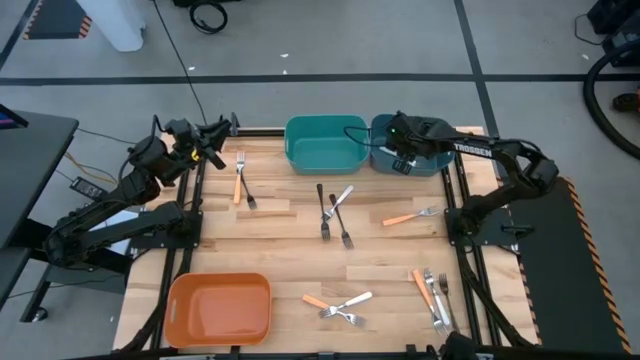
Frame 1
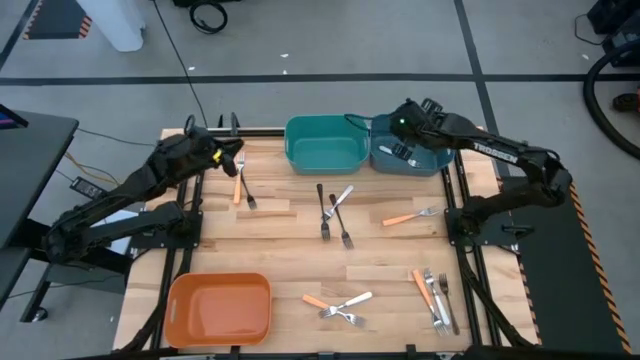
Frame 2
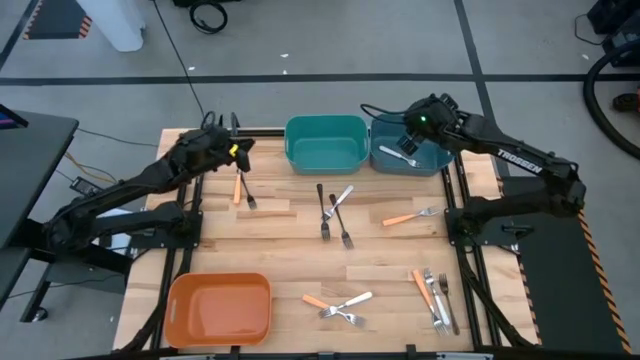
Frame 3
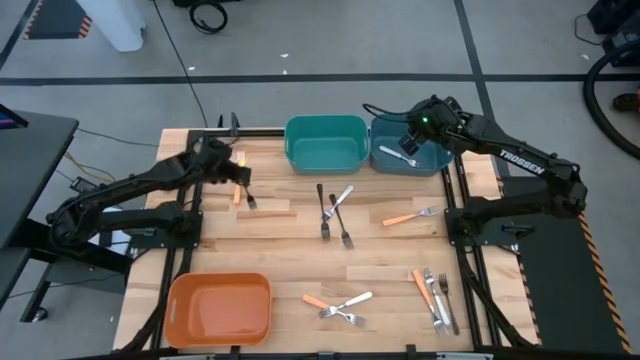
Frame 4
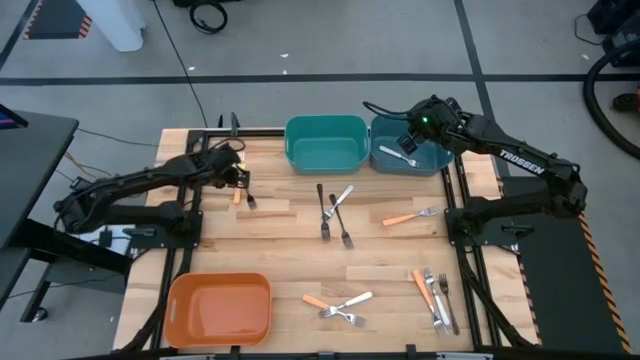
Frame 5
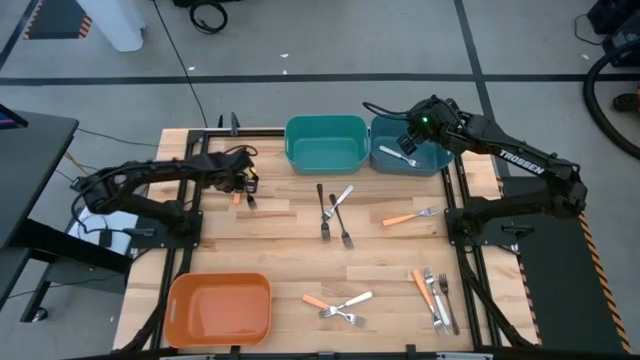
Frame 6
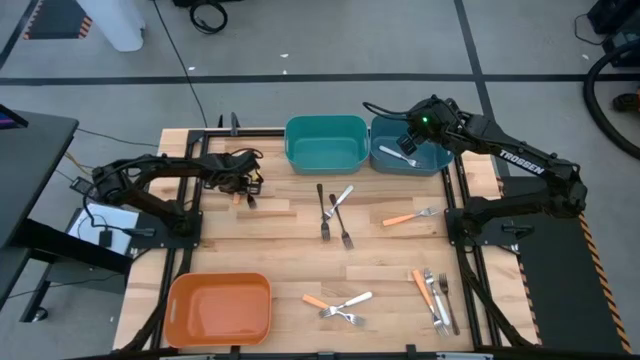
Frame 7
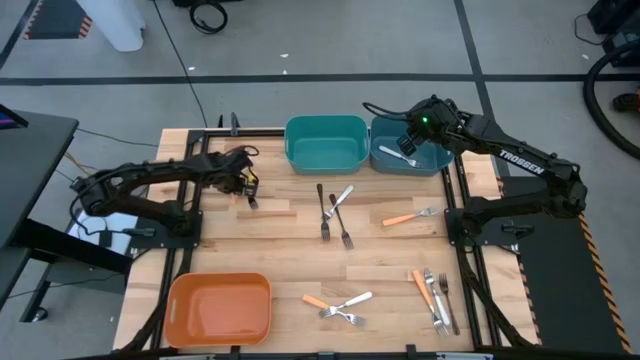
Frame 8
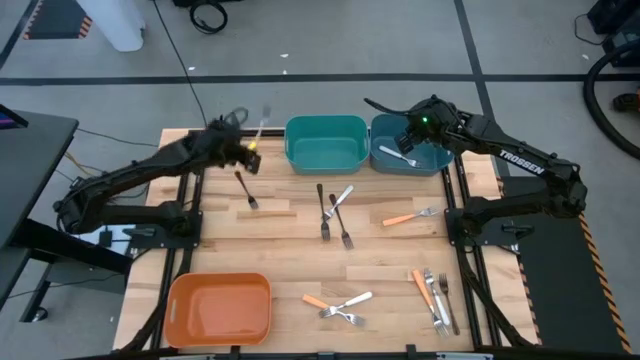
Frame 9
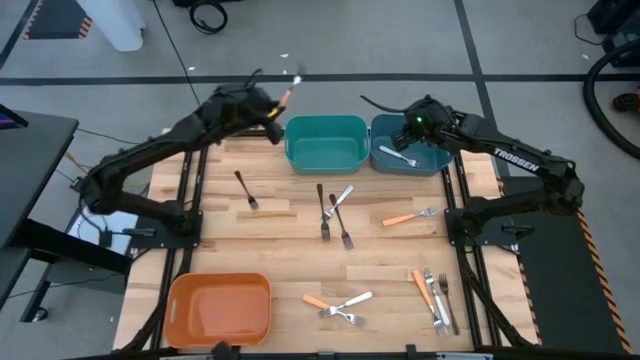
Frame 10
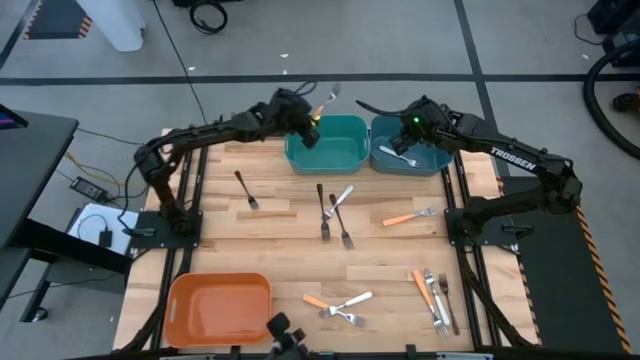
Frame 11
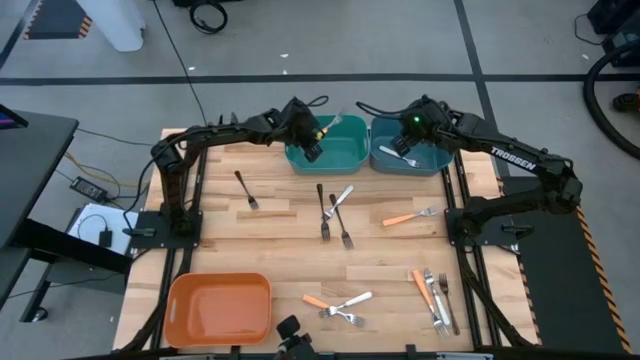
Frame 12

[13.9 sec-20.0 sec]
Task: Sort silverware by color (type)
Put the orange fork into the green bin

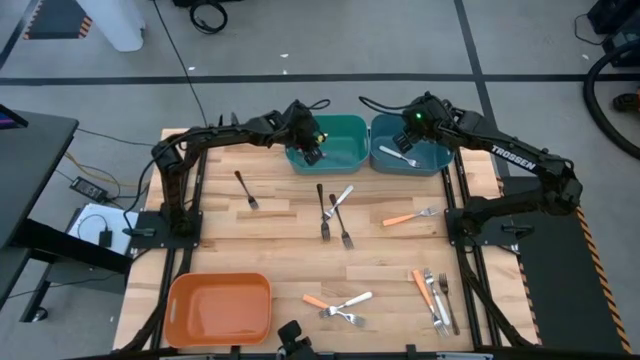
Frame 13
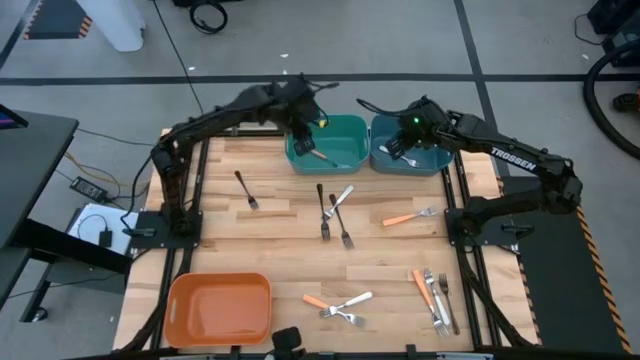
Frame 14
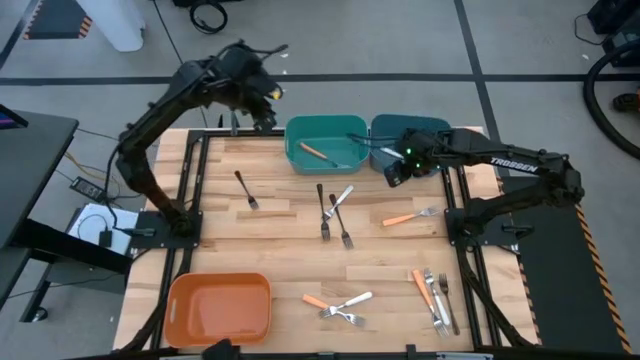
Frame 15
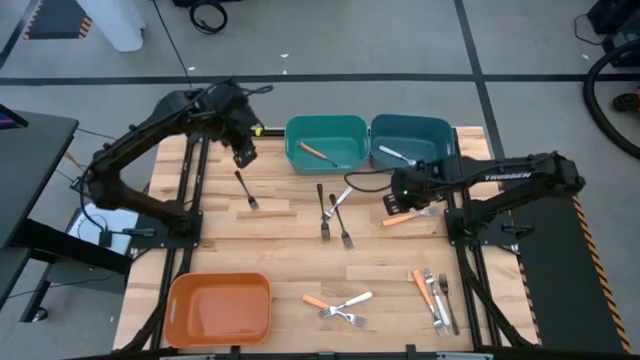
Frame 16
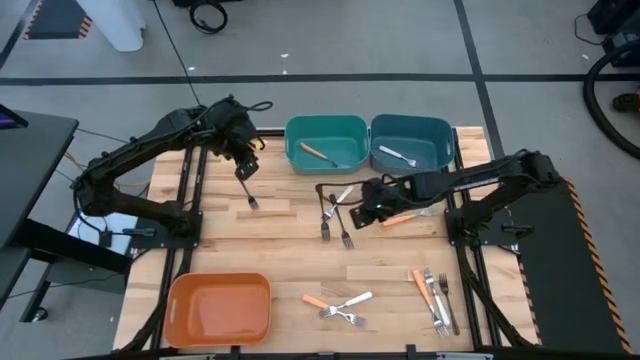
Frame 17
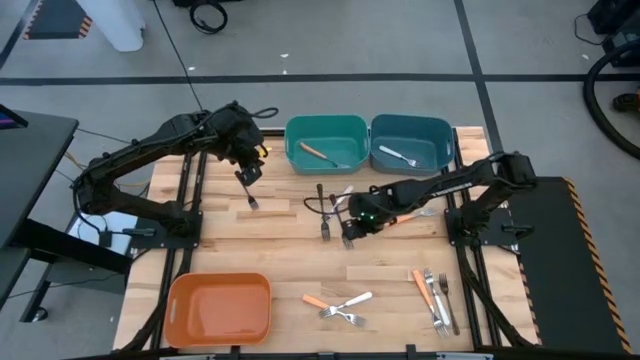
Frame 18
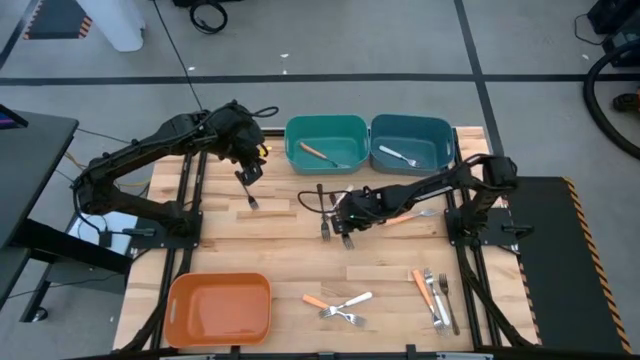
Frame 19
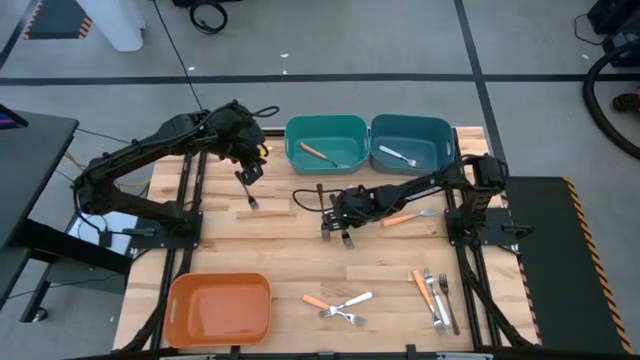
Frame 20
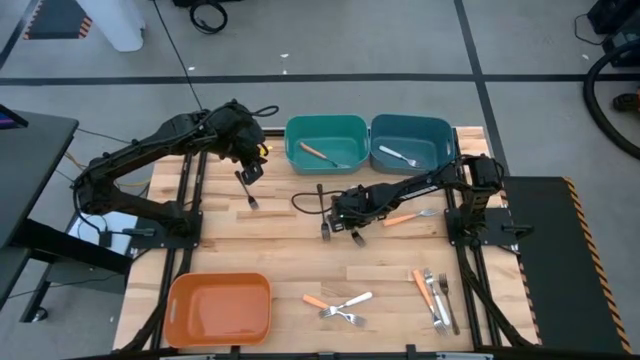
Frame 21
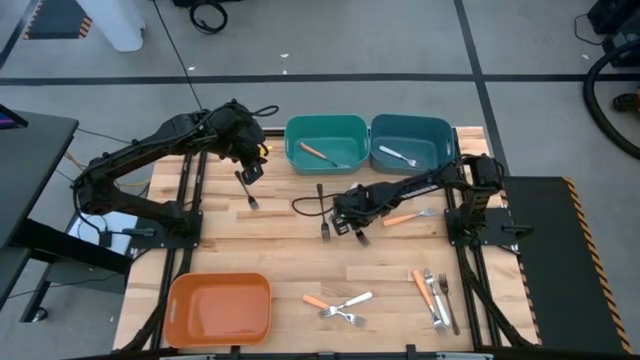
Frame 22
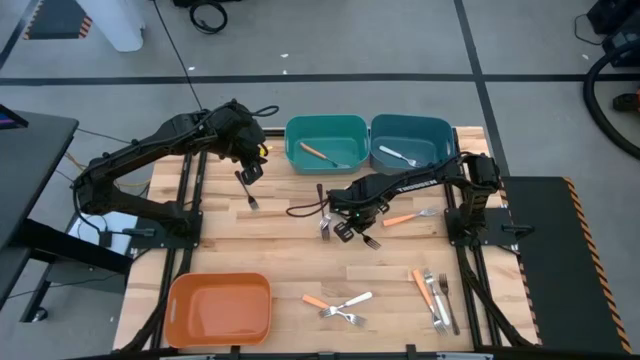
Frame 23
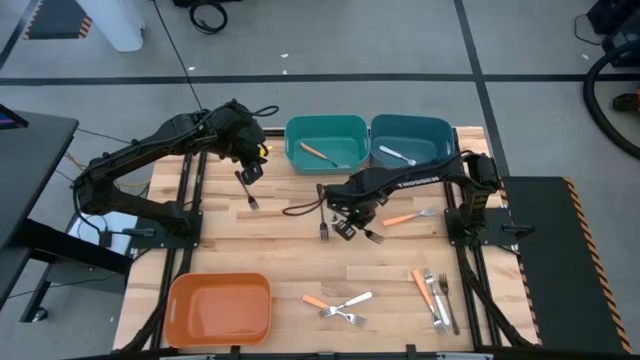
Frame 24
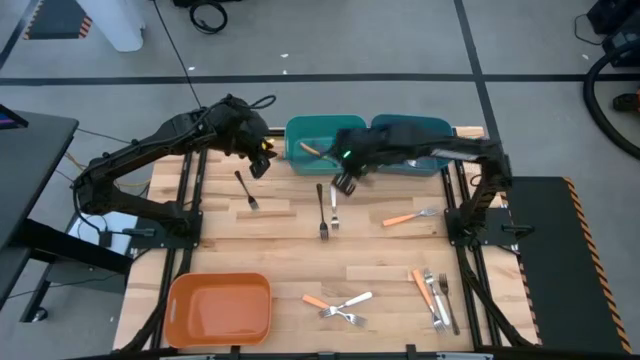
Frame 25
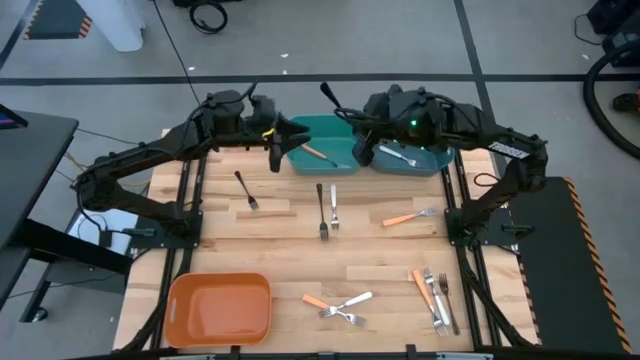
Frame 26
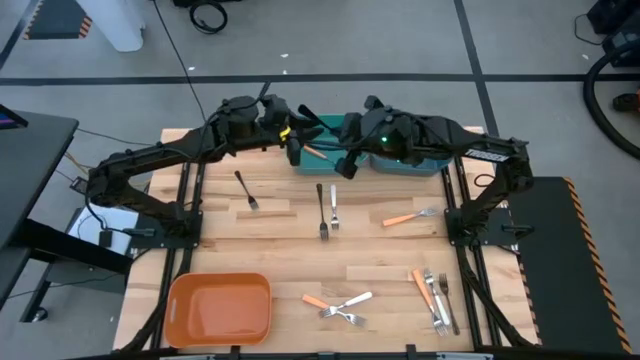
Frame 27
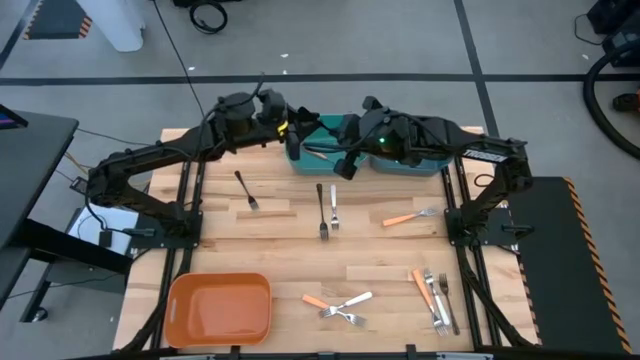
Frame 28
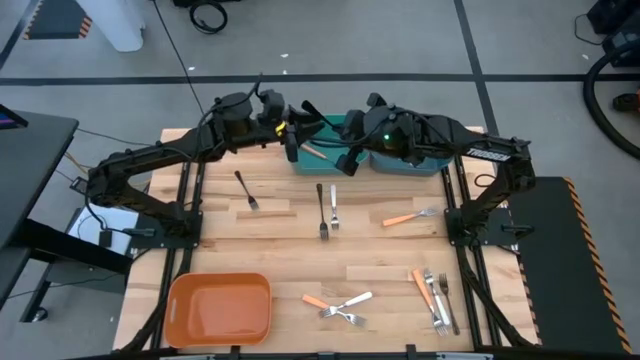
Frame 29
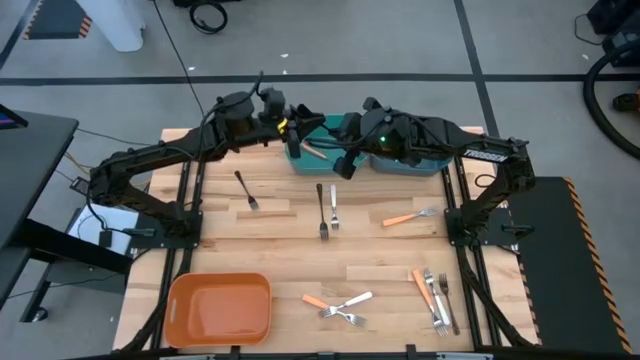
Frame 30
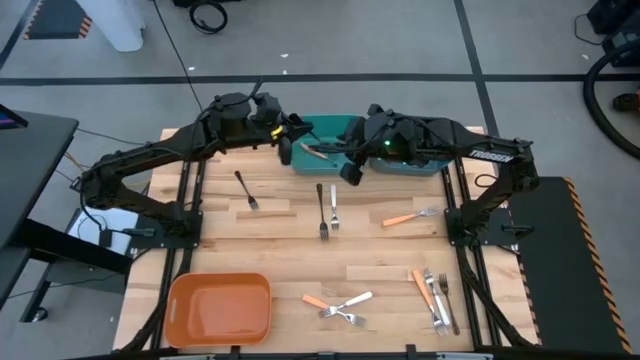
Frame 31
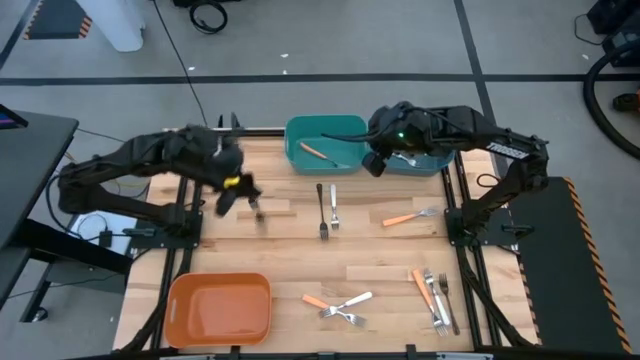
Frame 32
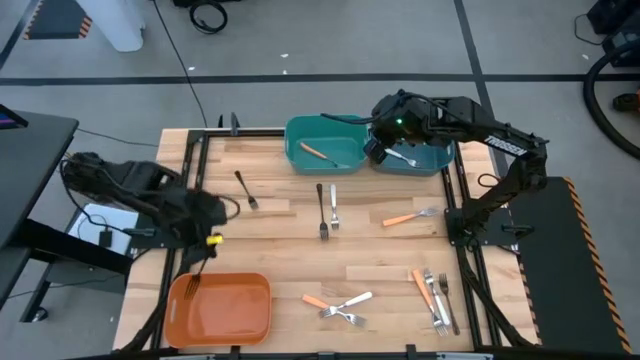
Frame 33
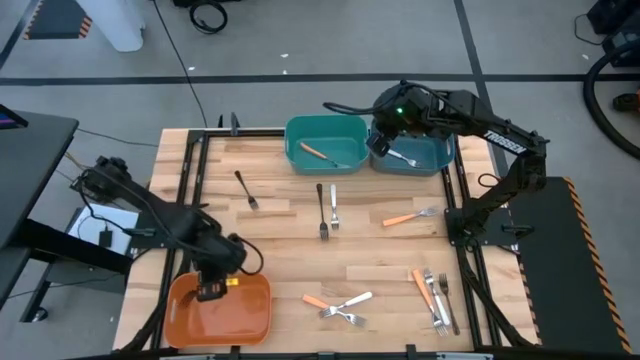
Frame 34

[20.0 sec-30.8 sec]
Put the black fork into the orange bin

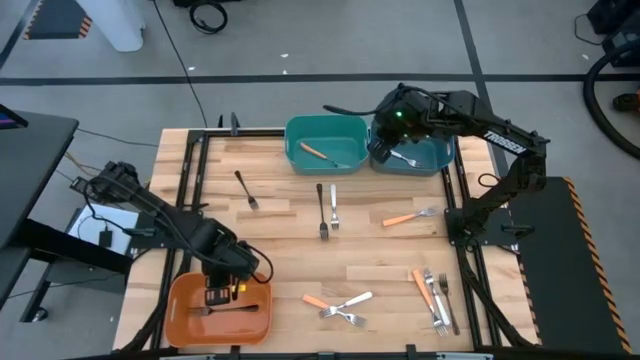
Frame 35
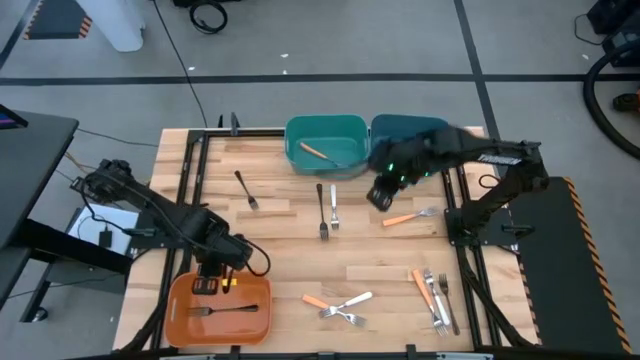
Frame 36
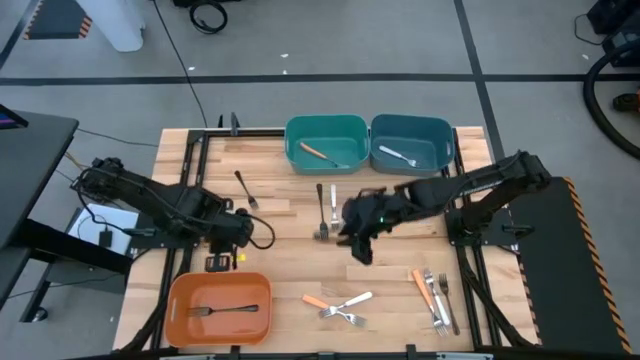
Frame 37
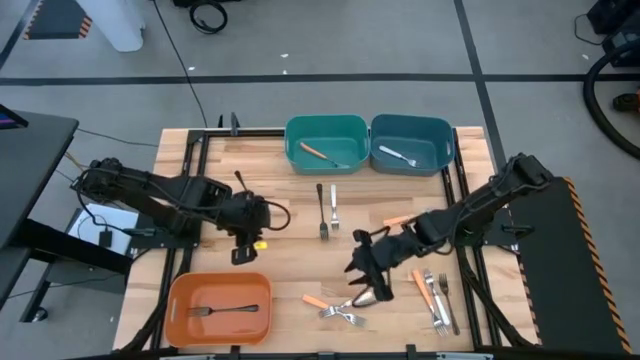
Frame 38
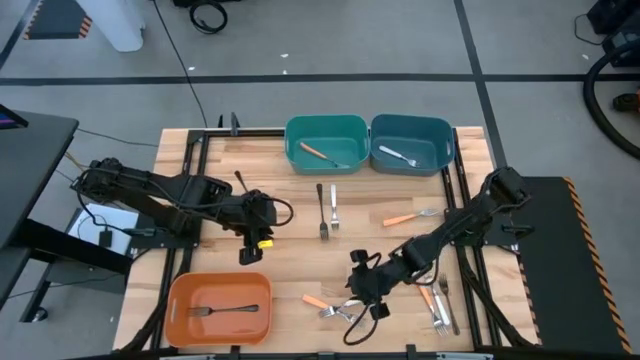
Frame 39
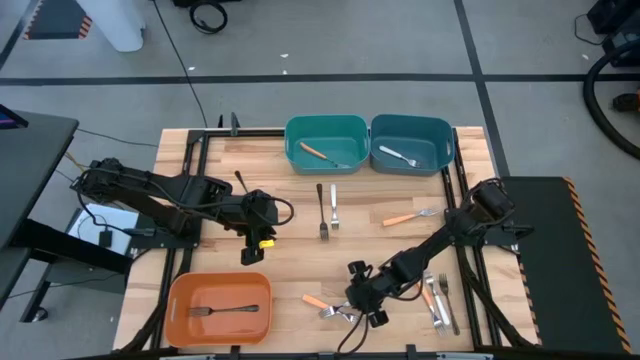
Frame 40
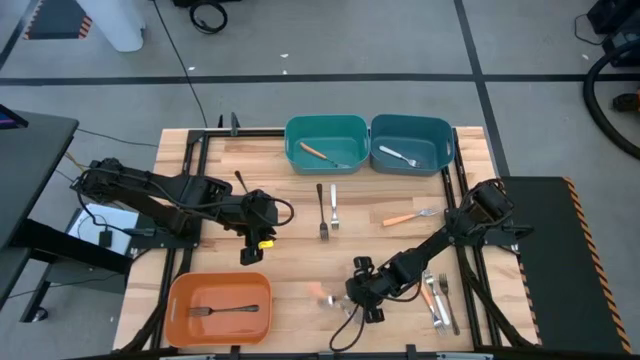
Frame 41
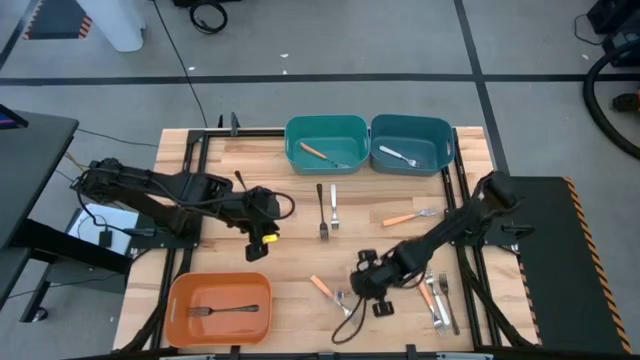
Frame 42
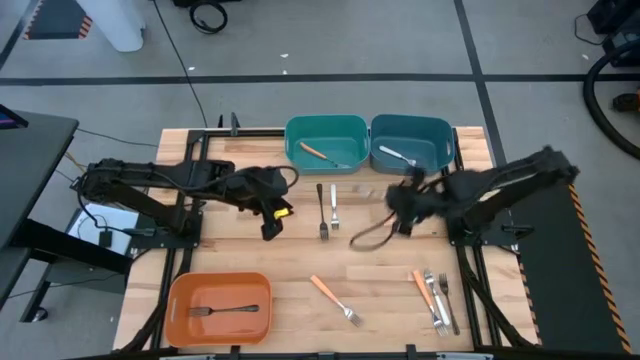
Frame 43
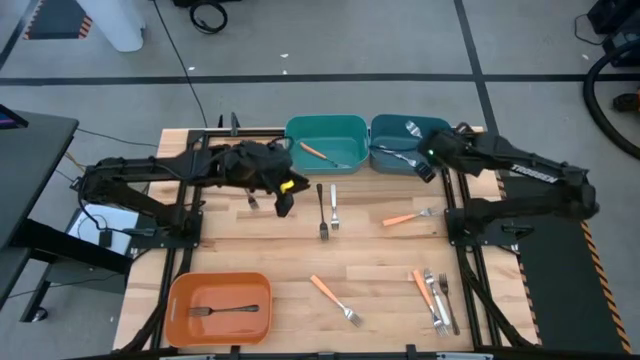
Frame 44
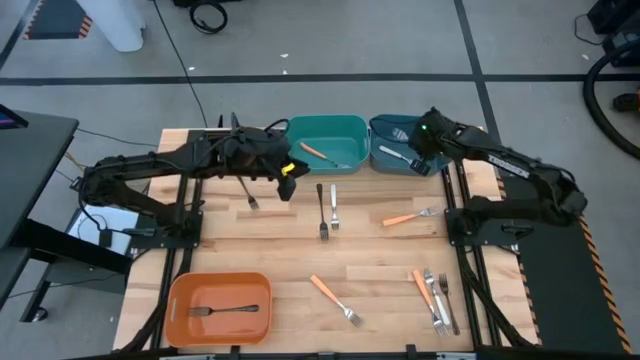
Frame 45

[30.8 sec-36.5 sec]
Put the white fork into the blue bin
